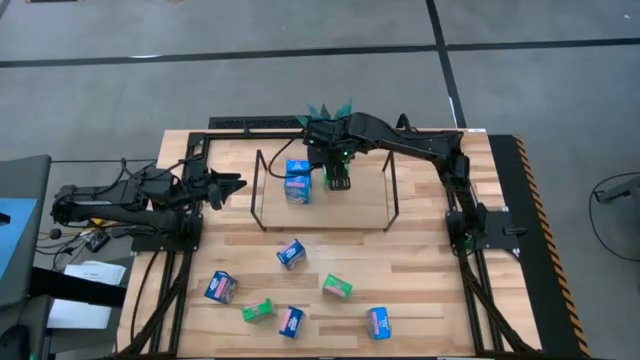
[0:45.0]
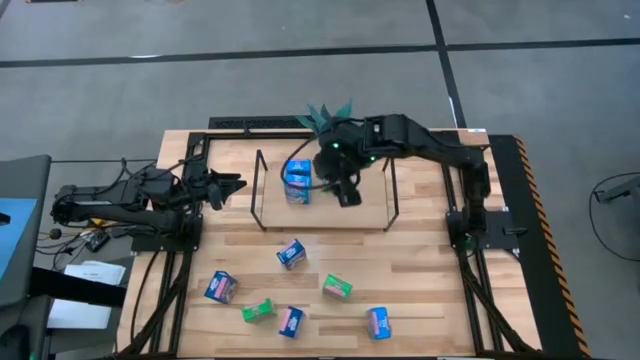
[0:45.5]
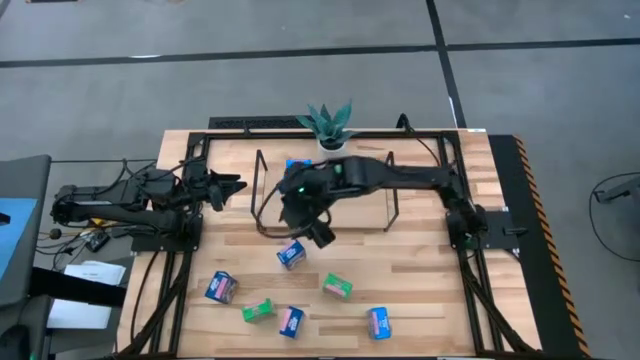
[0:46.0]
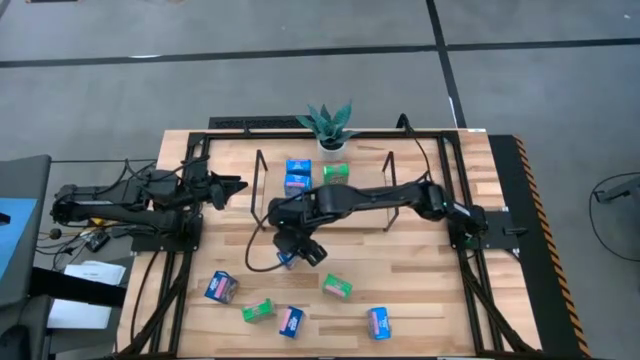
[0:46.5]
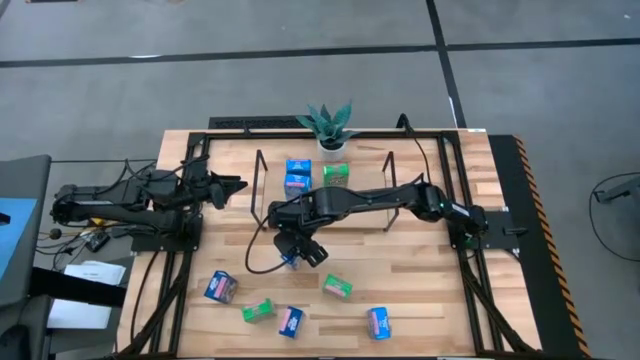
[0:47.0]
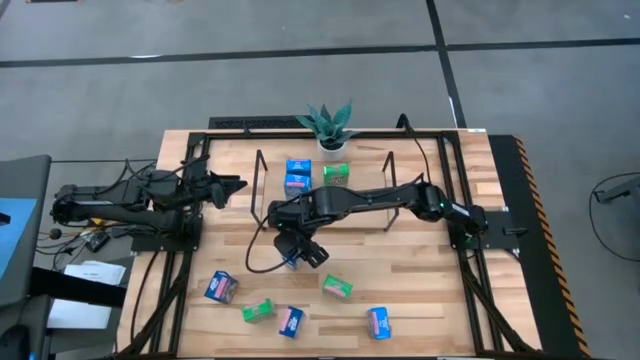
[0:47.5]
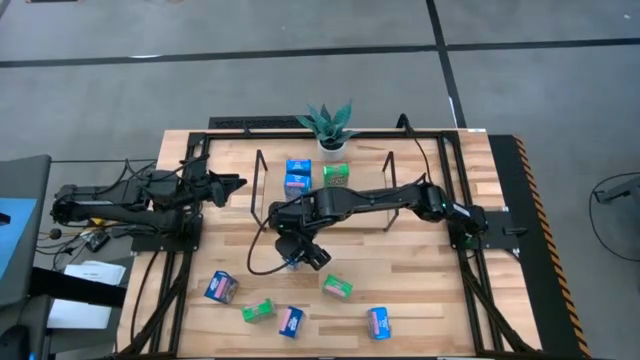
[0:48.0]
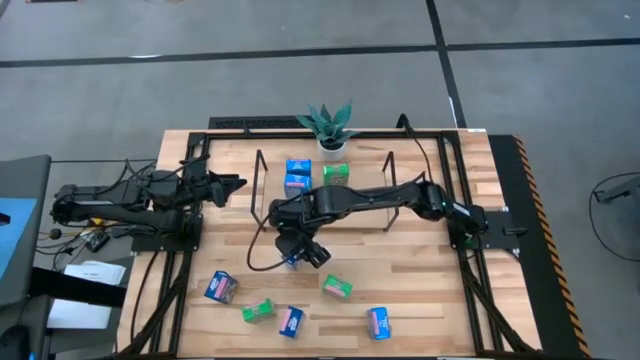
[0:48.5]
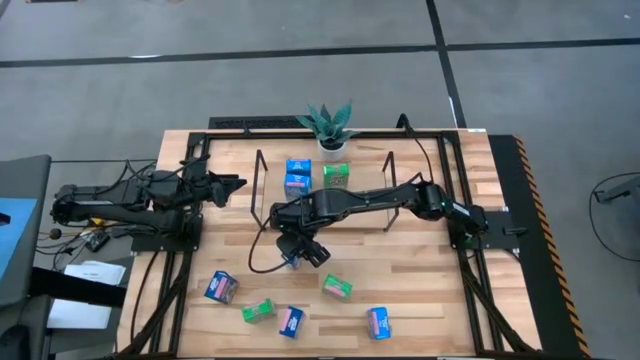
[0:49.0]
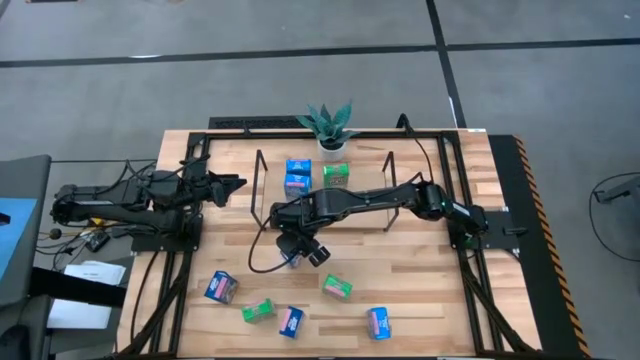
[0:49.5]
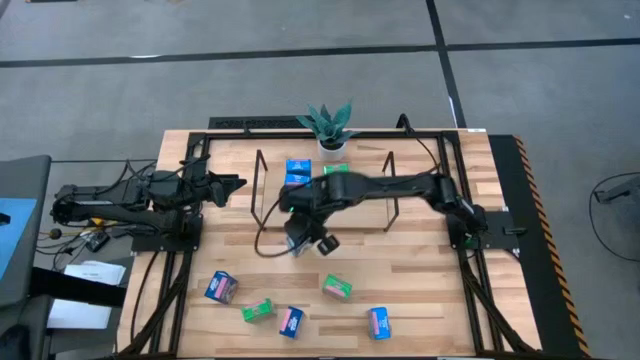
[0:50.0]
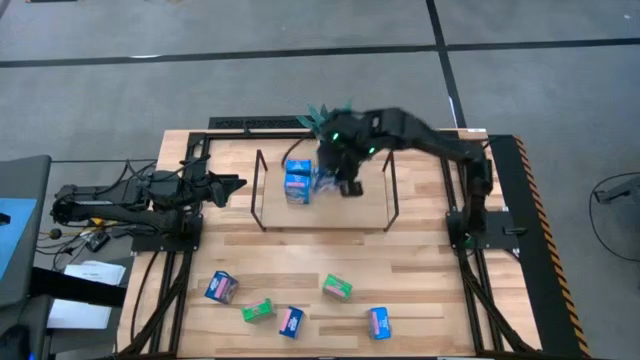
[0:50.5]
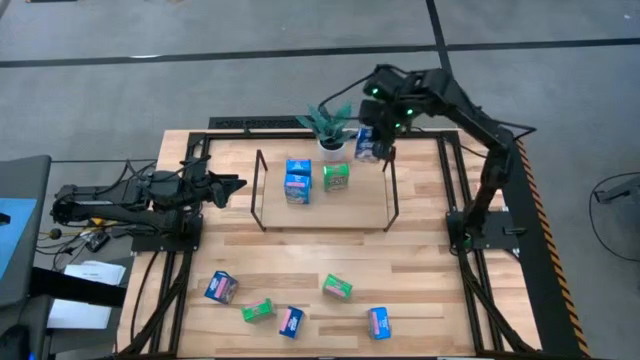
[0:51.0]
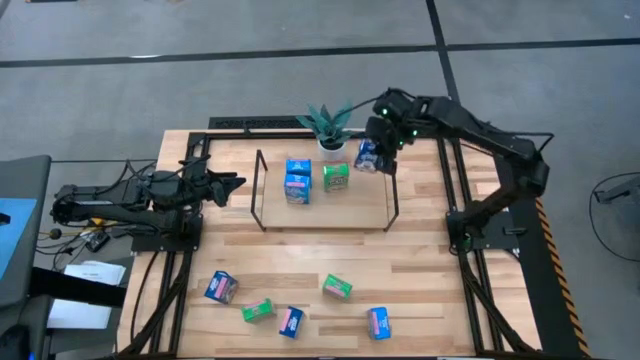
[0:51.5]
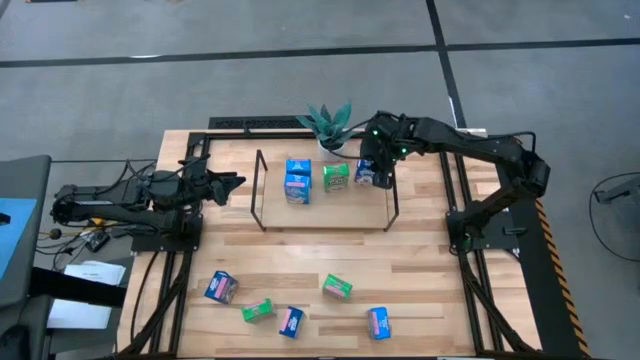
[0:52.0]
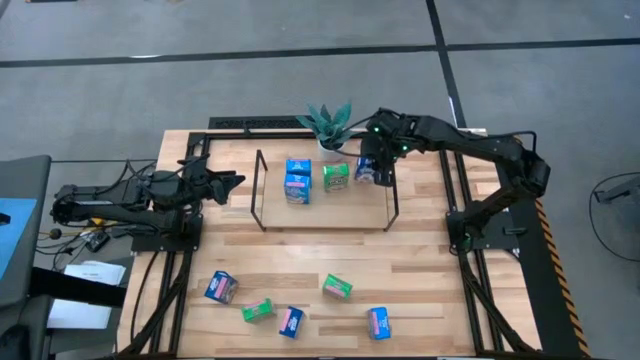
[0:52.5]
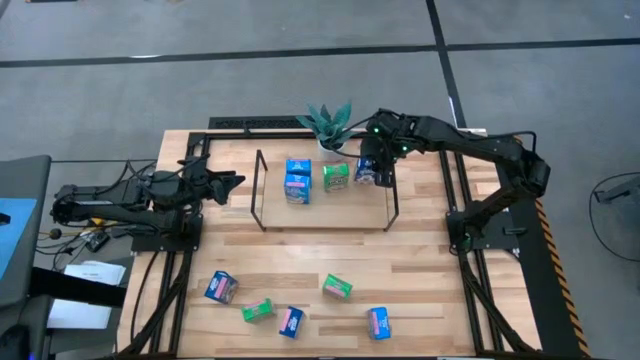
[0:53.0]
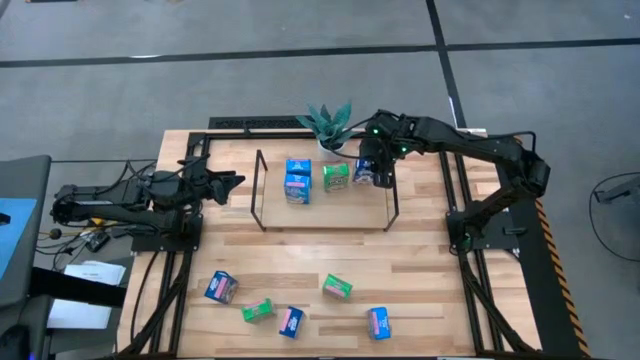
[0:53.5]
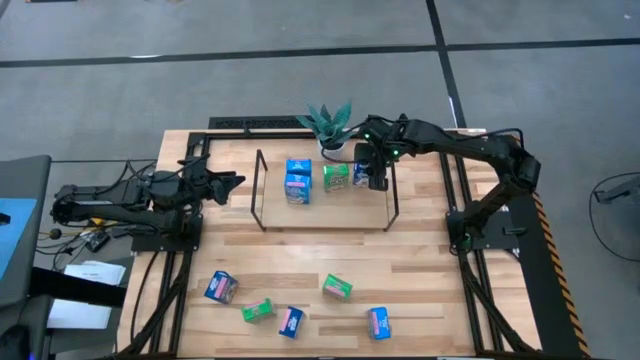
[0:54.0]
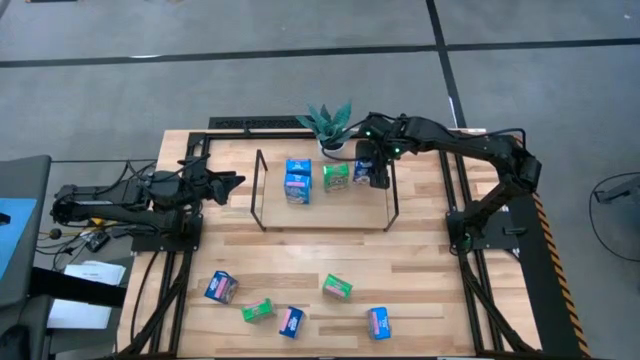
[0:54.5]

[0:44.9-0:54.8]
Task: Stack cereal on shelf
Put the top blue cereal box on the shelf

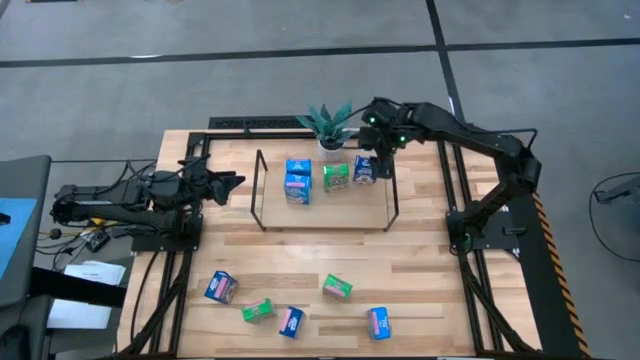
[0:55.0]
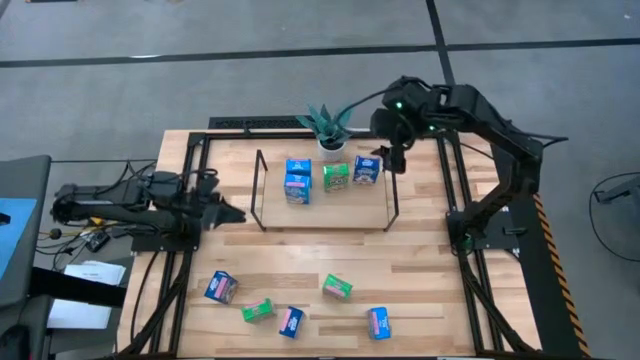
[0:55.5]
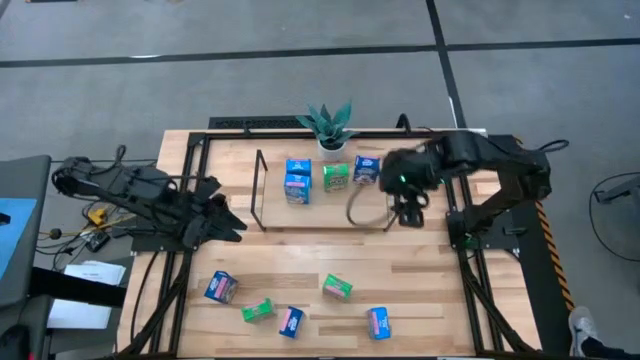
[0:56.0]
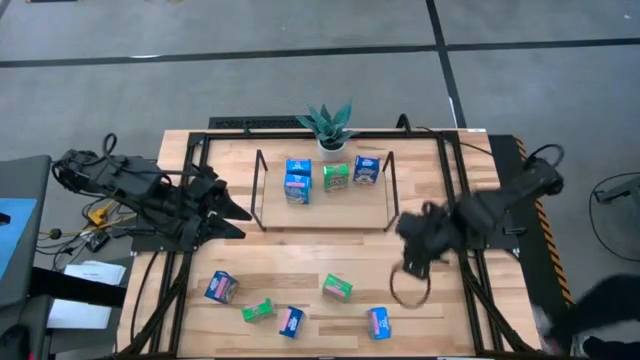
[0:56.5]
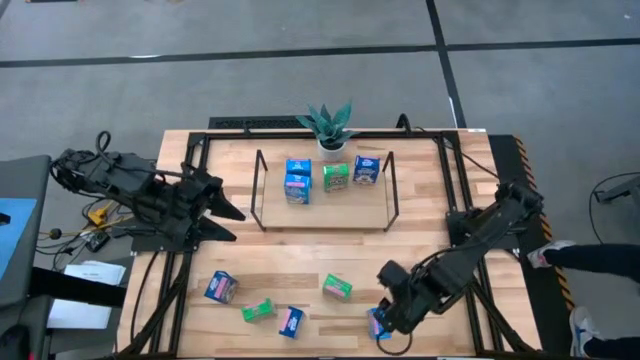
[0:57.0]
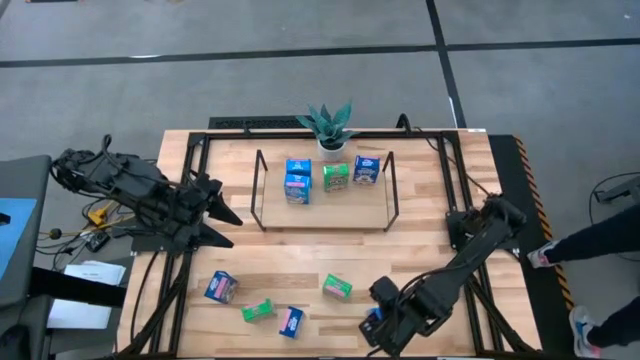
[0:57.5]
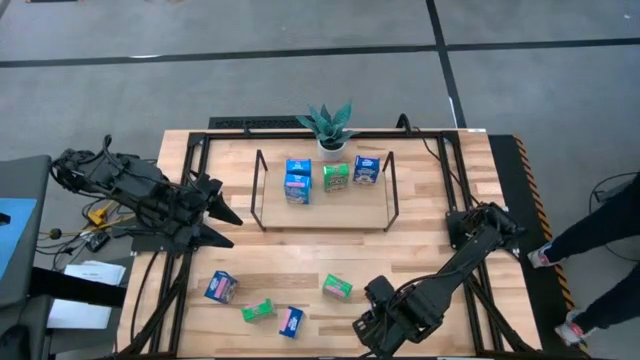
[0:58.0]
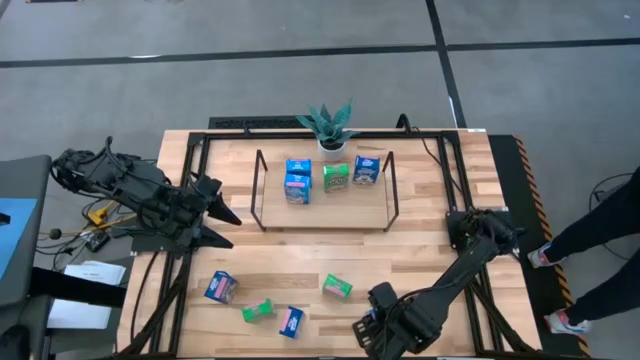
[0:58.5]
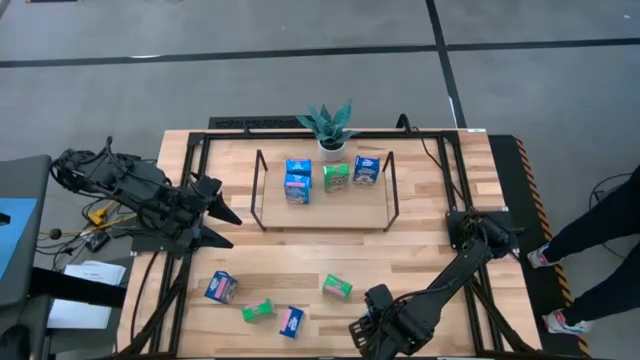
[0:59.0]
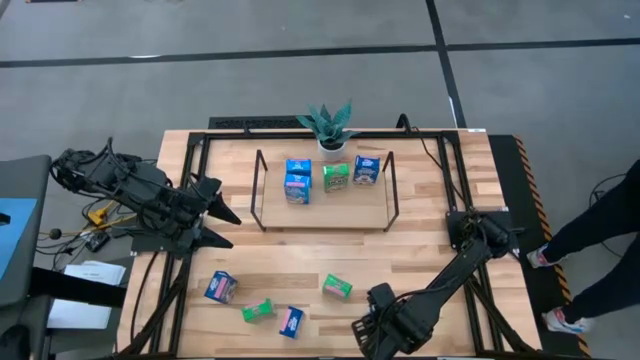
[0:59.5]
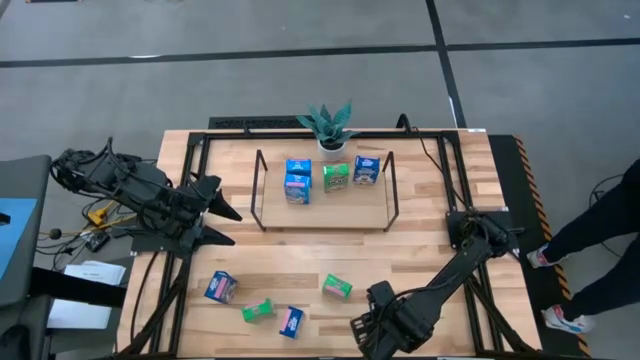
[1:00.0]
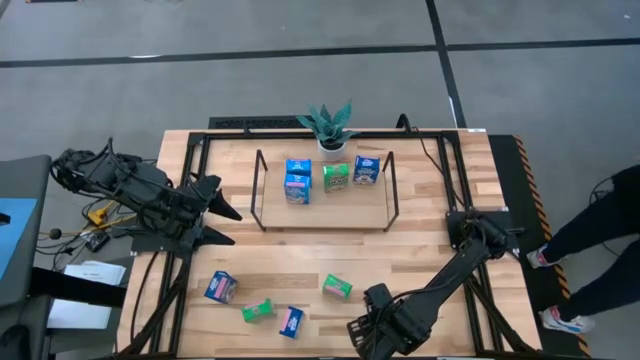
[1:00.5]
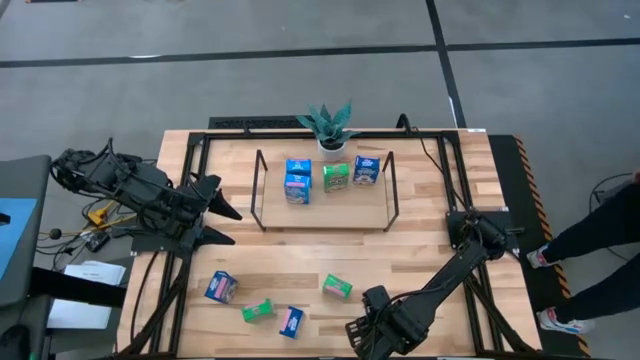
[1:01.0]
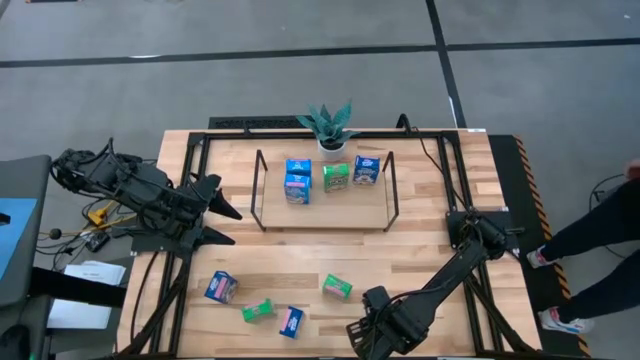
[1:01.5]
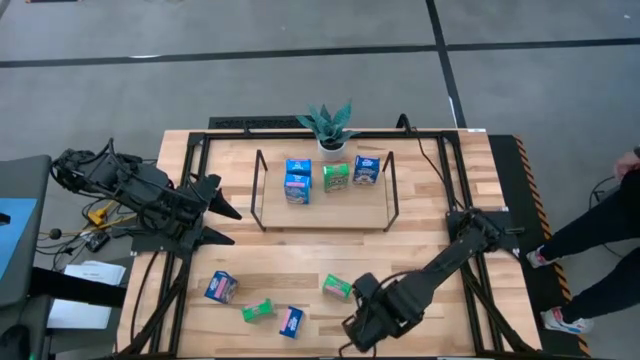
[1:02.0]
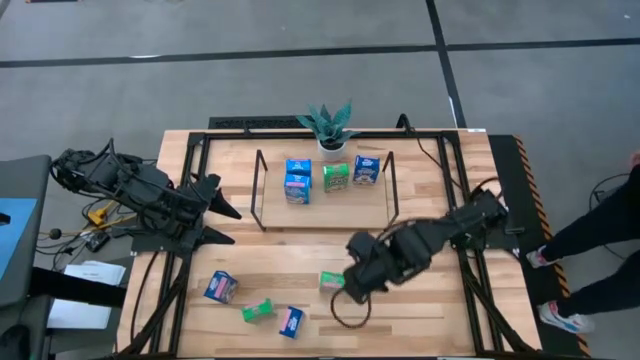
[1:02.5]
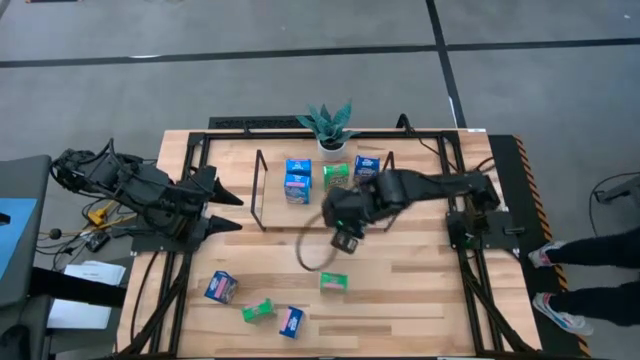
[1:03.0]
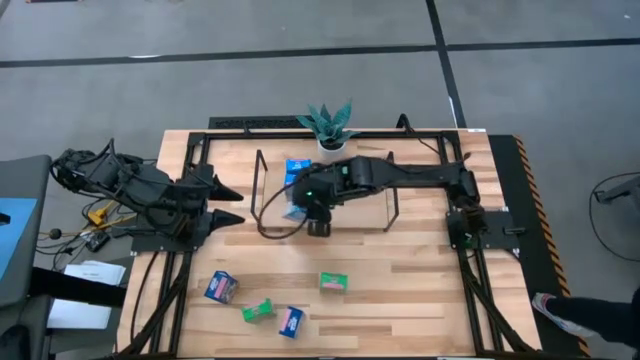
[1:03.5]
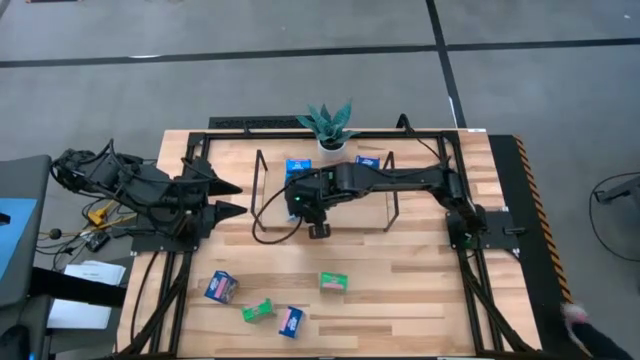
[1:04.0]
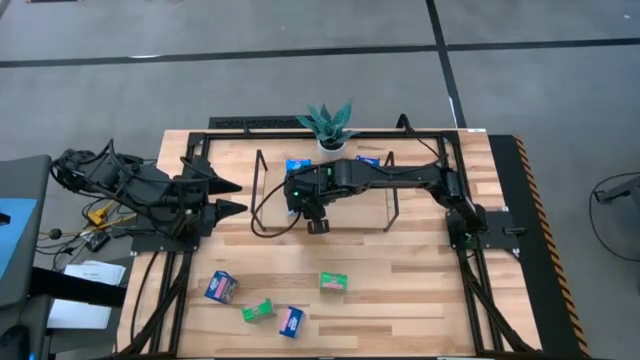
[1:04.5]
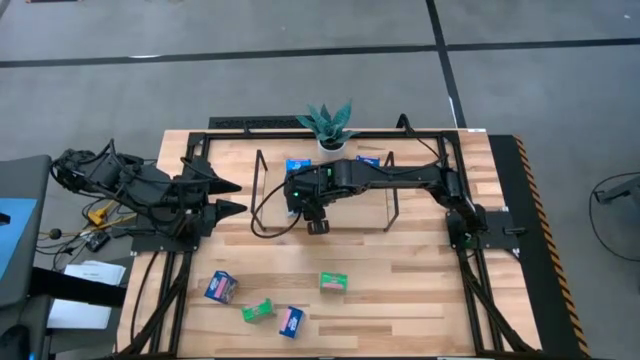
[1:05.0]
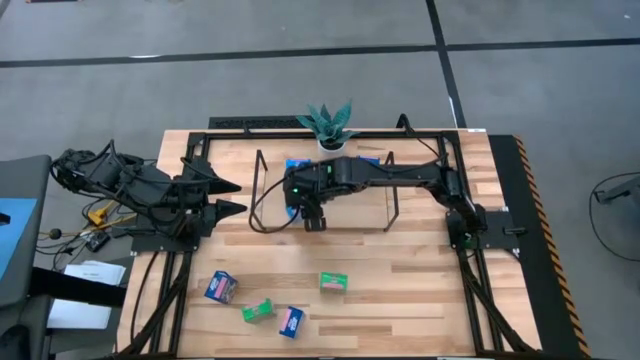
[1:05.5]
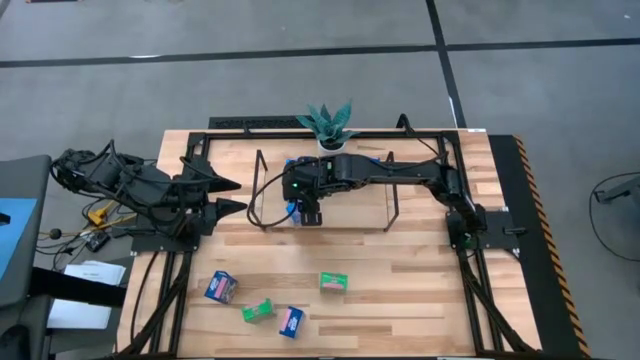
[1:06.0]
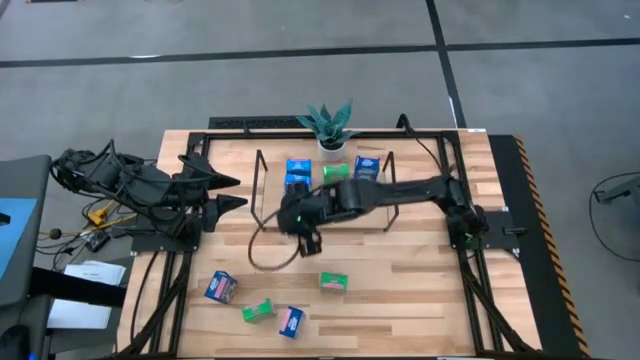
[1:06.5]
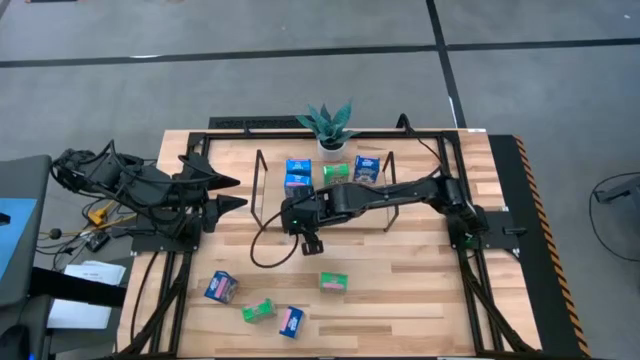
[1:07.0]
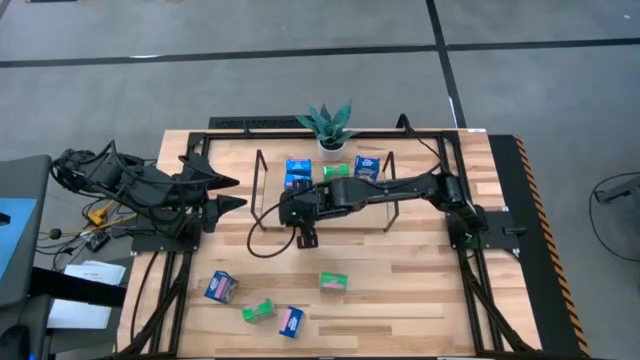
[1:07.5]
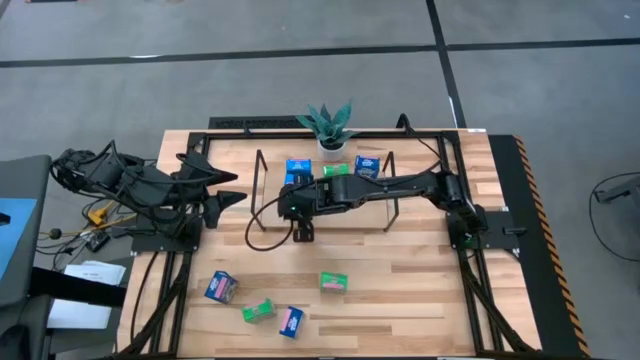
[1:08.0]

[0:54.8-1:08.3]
Put the light blue cereal box on the shelf aligned with the other light blue cereal boxes
